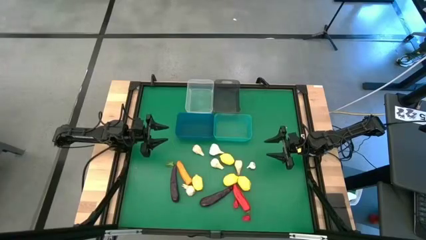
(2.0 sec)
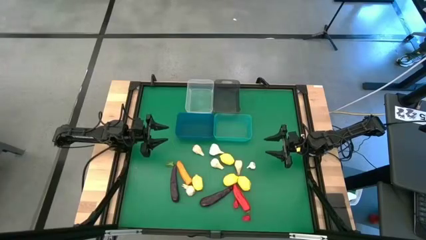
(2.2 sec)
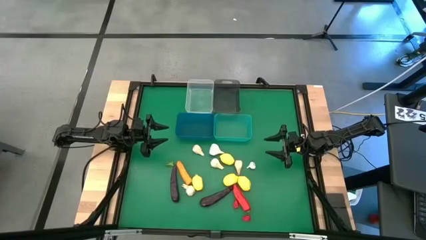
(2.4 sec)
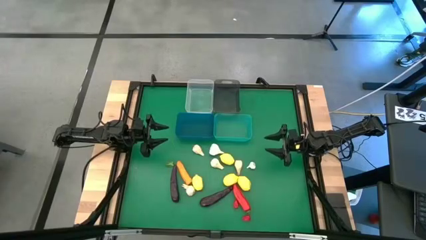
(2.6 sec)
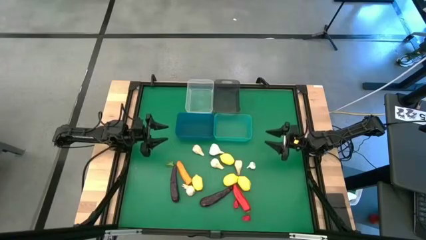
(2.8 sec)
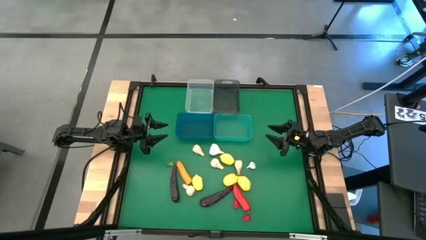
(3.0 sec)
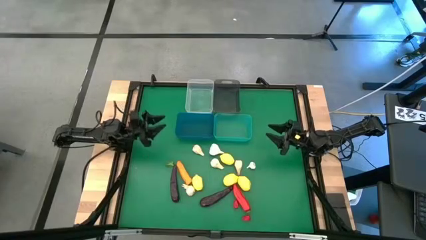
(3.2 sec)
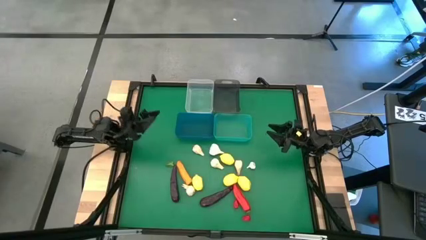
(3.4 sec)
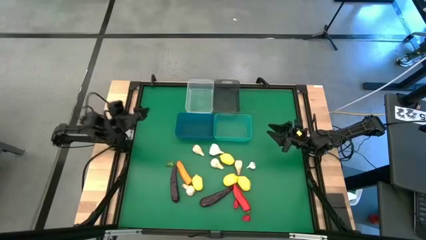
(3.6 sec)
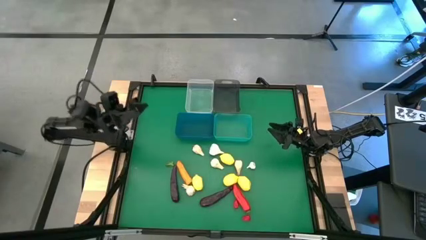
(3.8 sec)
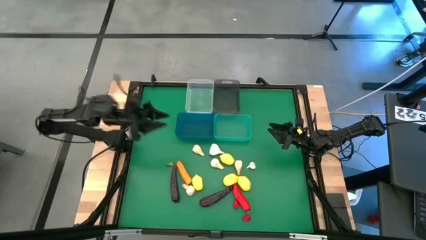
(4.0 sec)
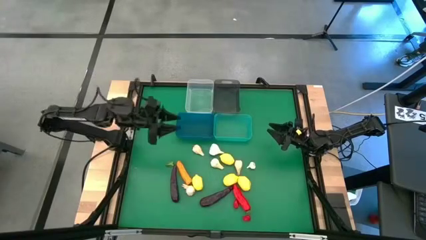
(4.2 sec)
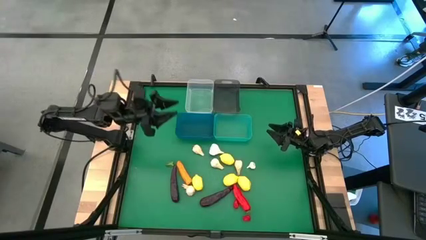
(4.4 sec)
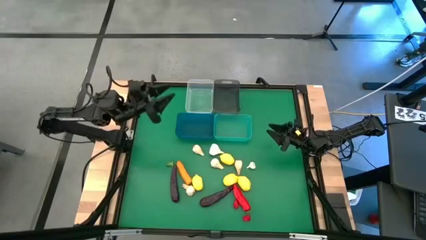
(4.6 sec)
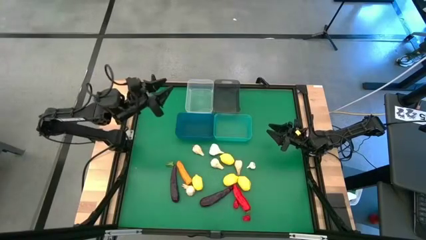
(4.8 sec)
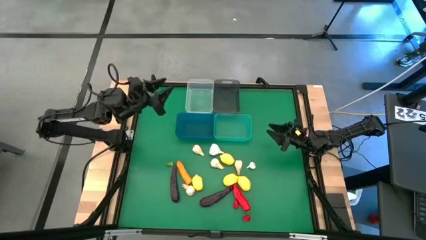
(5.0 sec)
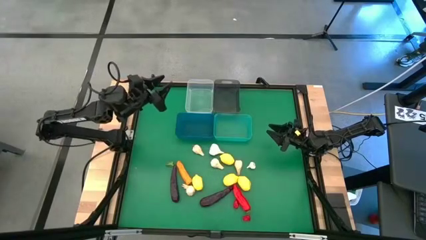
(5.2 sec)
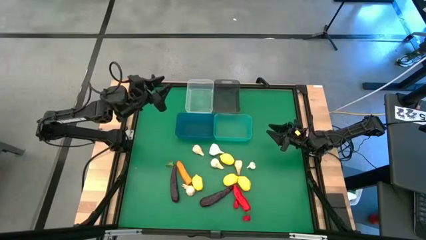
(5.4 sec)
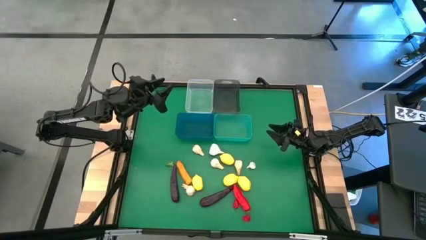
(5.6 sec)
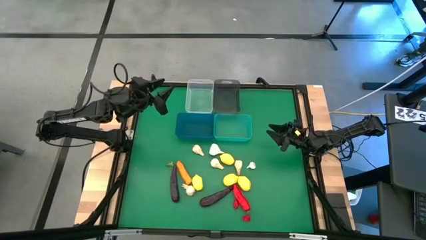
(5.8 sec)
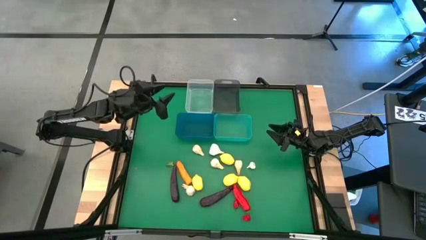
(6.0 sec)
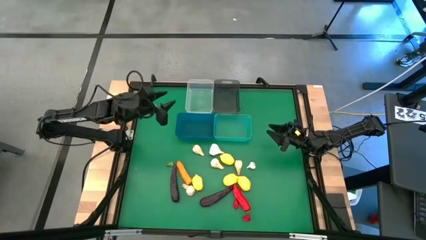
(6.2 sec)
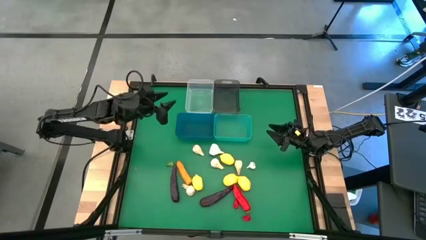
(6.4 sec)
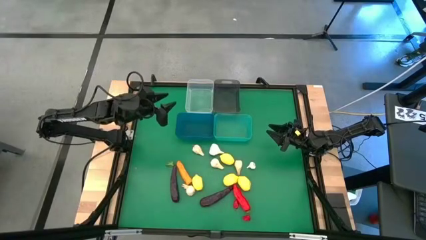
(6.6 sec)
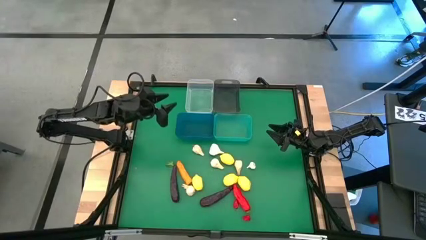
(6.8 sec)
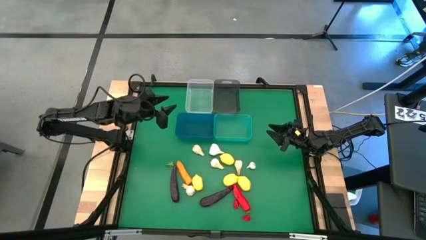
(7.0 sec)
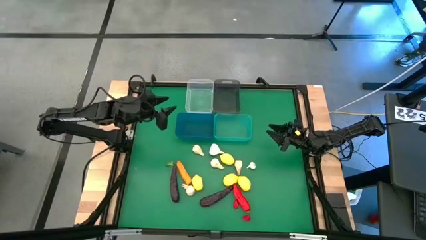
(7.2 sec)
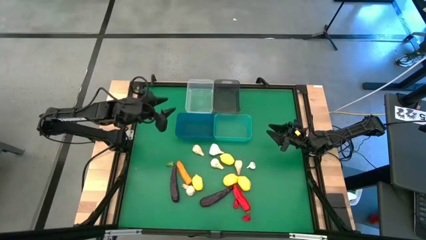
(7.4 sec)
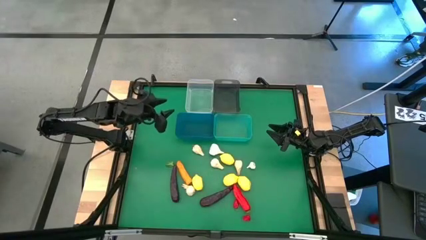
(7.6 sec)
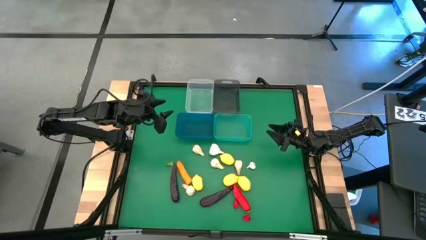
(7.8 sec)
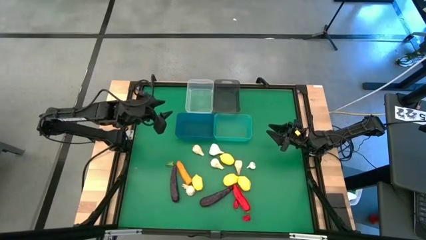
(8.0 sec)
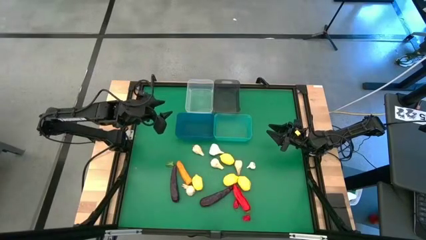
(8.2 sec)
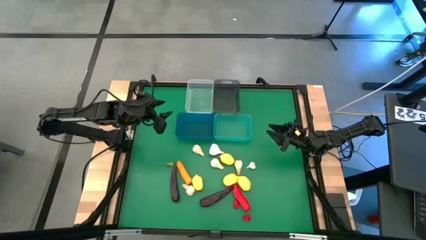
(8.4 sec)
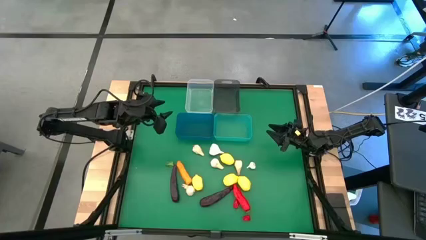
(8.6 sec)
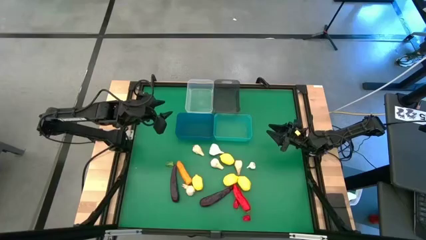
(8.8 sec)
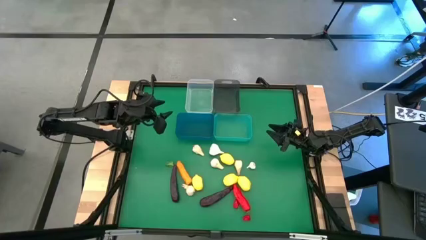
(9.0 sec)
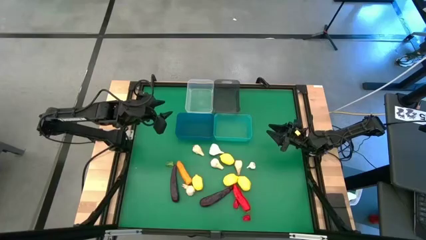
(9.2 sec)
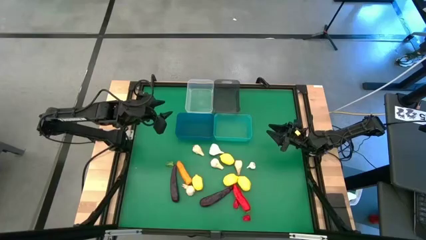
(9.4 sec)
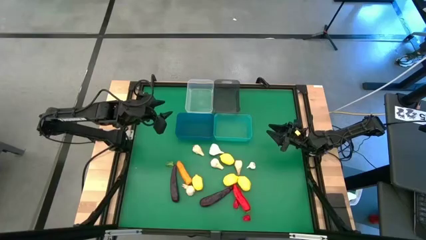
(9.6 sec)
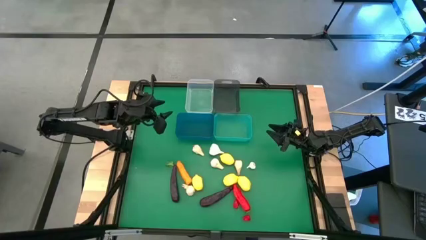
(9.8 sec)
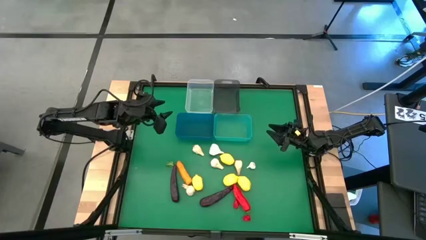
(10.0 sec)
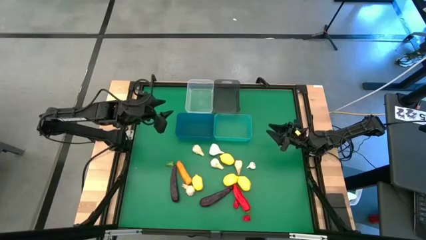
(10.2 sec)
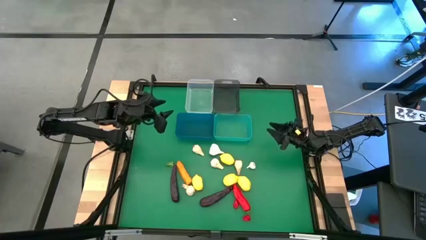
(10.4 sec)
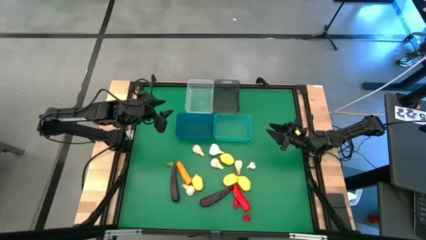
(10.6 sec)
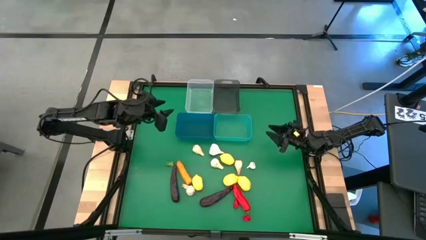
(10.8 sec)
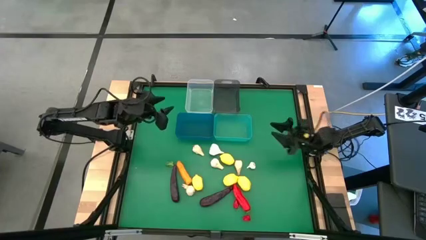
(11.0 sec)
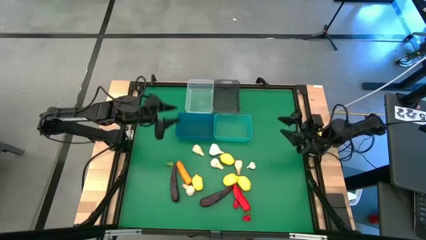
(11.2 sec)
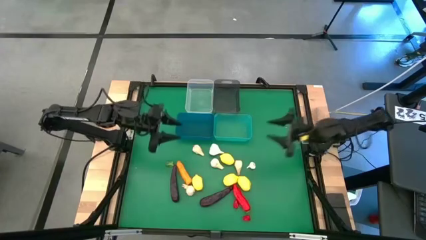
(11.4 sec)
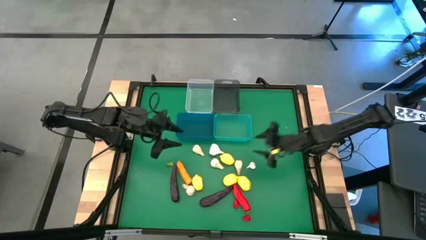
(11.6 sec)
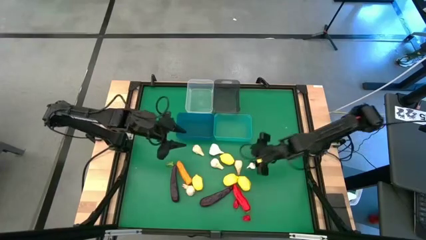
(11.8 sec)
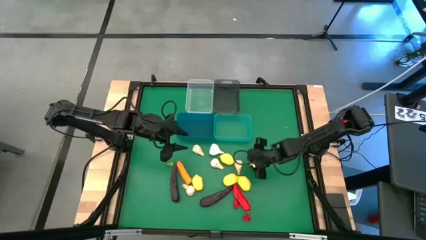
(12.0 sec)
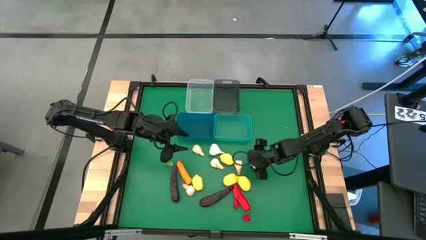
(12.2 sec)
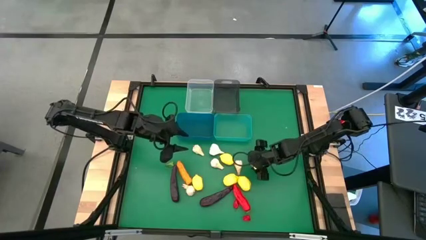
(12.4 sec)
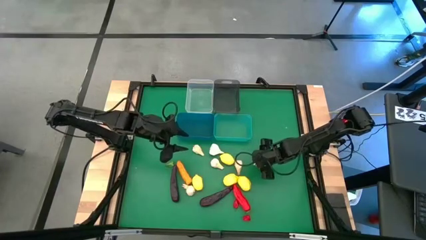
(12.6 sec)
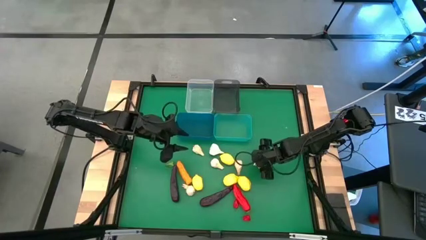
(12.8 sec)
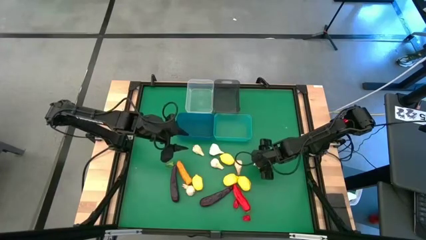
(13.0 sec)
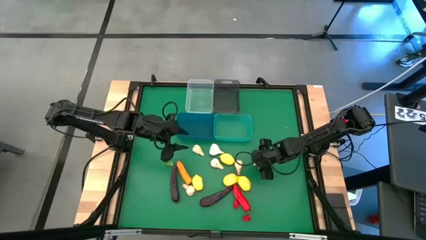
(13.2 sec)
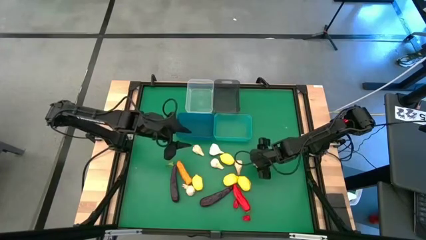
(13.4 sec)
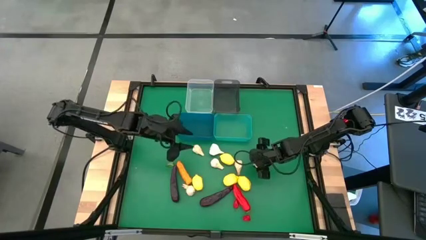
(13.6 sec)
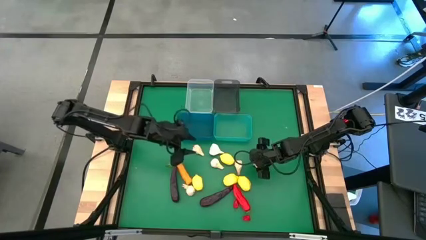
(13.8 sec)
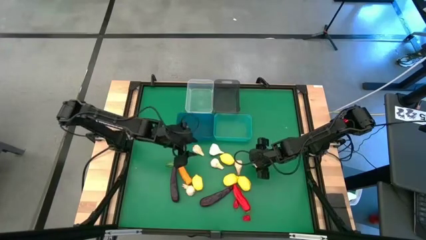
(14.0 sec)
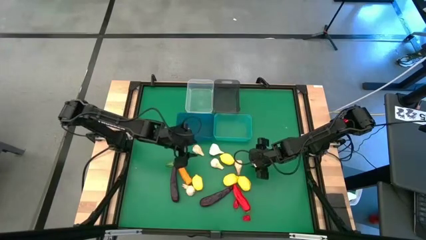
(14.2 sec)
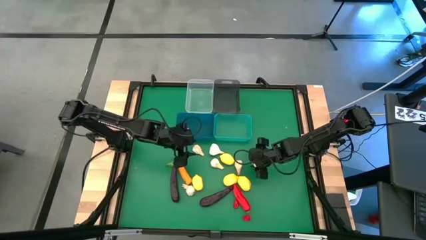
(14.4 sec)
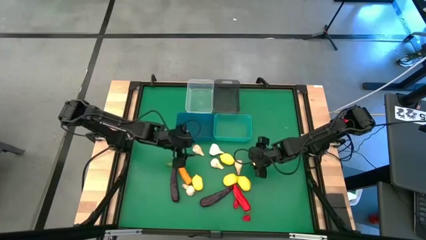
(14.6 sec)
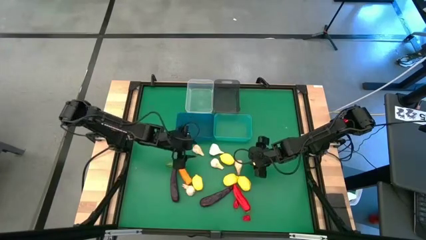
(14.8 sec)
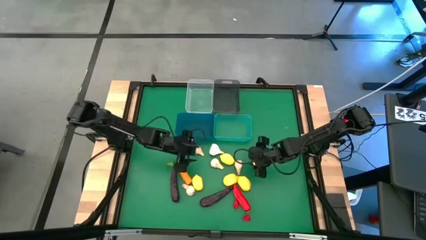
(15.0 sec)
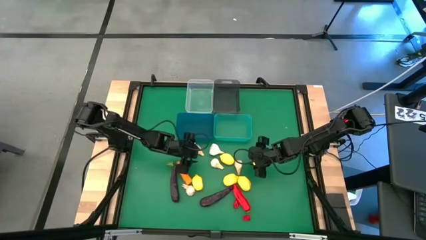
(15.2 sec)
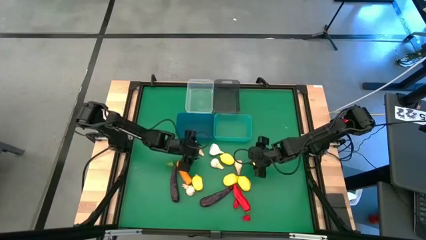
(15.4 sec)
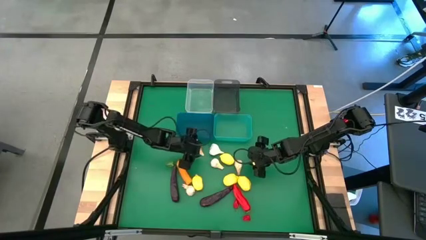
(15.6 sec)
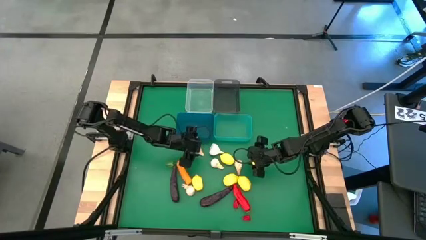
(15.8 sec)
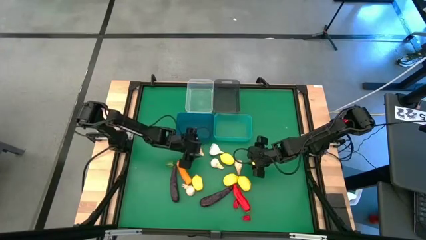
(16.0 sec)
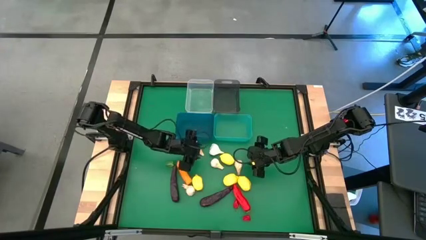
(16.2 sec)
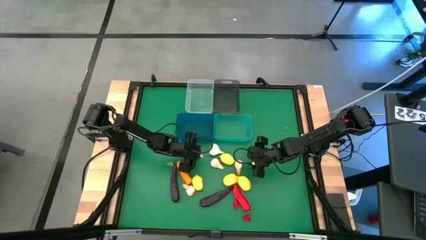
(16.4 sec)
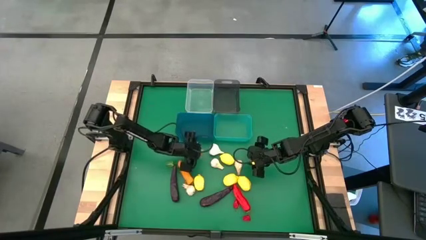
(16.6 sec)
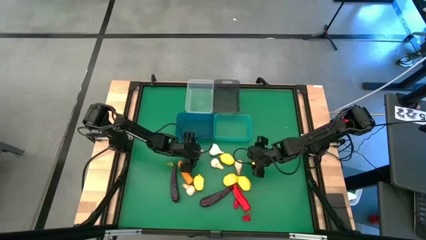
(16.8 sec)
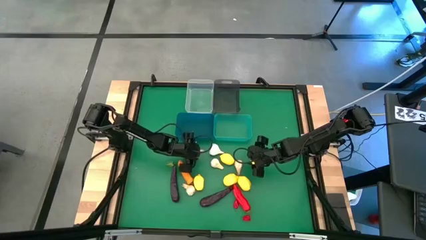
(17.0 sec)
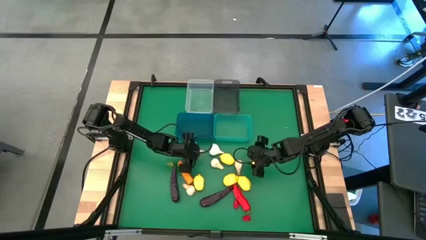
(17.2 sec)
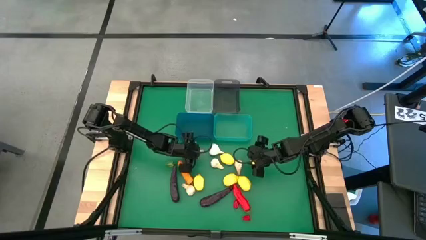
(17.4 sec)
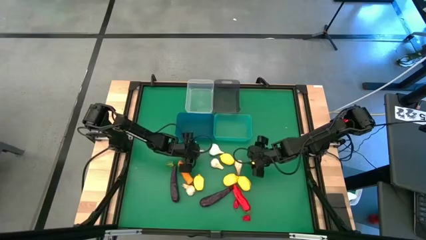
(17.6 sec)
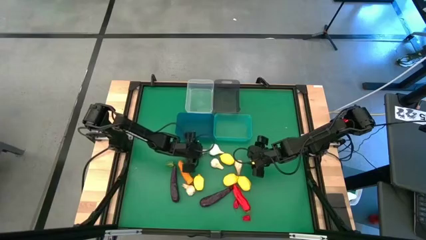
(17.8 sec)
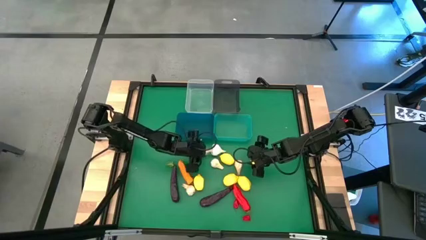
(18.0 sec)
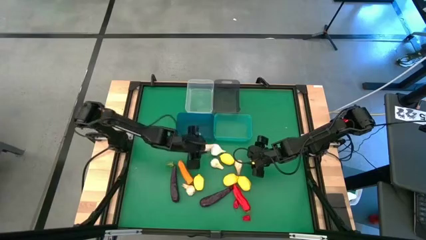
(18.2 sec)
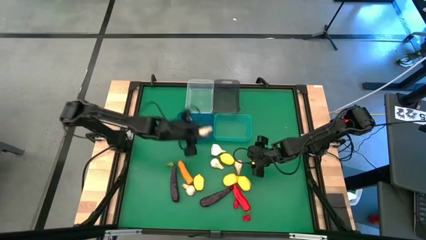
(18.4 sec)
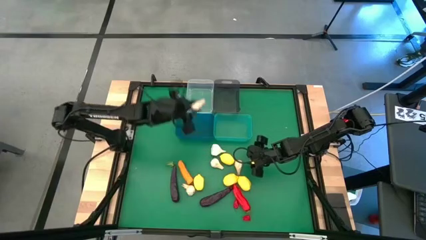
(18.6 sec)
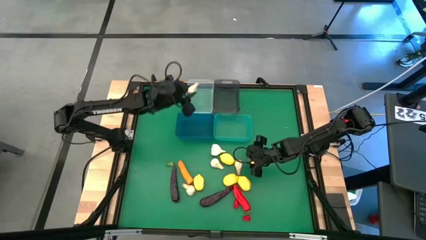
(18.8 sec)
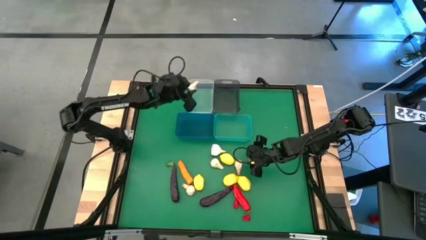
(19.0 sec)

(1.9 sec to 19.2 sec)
Task: Sort produce into baskets
Put the white garlic into the transparent bin
